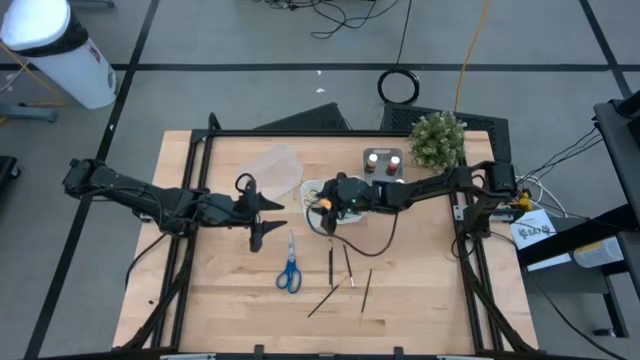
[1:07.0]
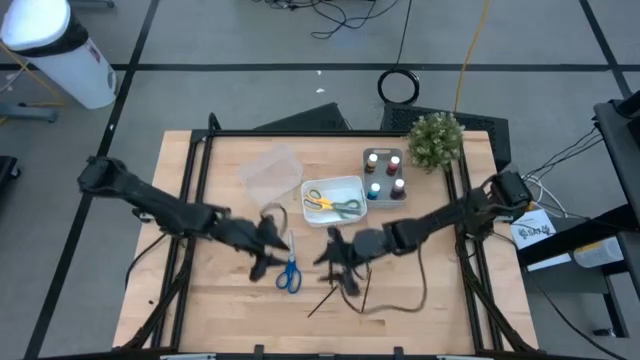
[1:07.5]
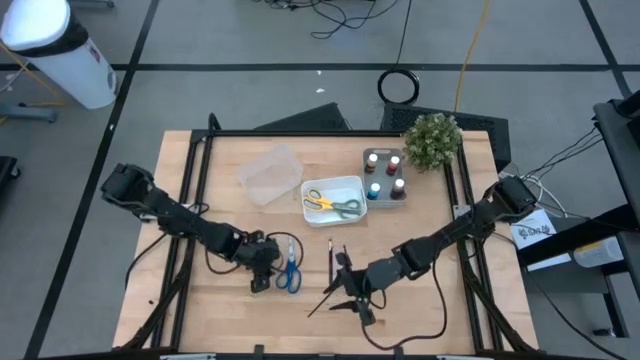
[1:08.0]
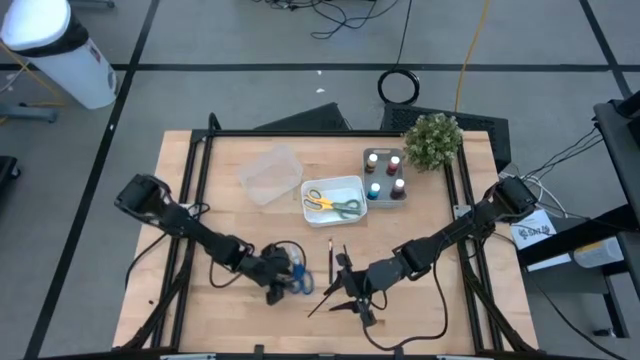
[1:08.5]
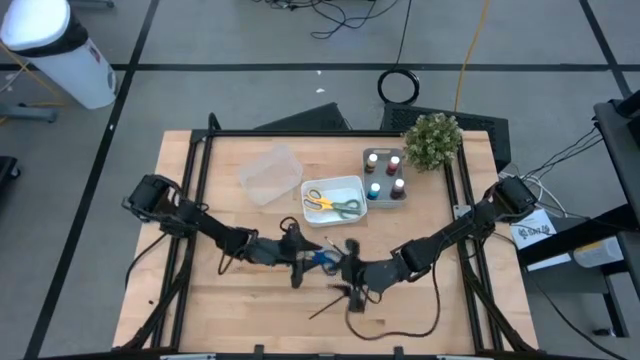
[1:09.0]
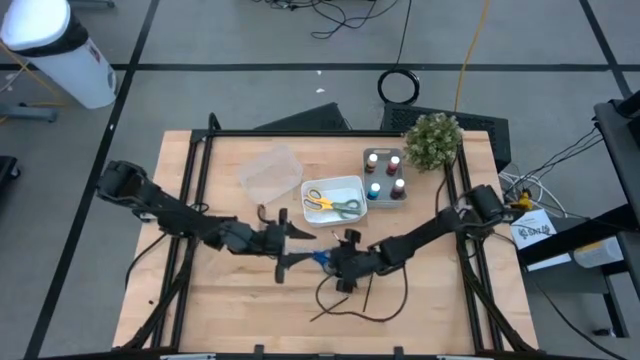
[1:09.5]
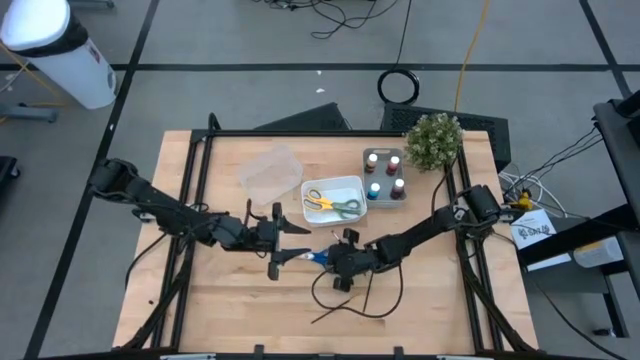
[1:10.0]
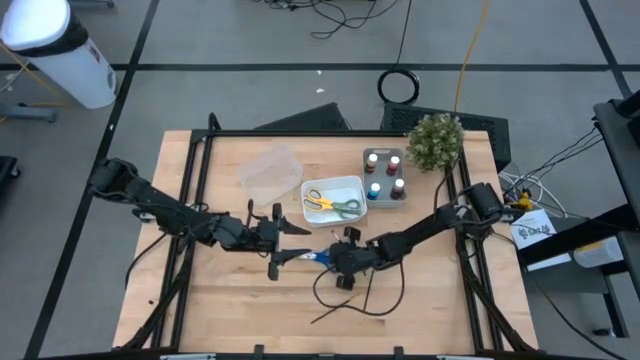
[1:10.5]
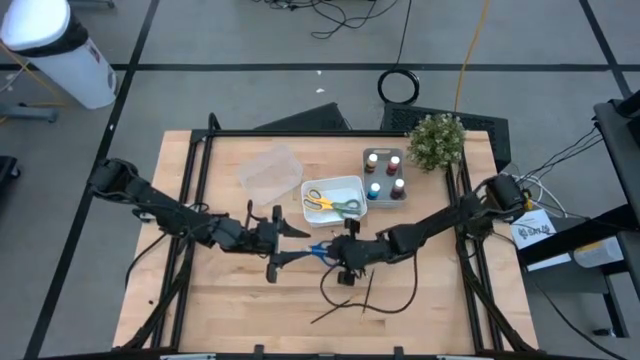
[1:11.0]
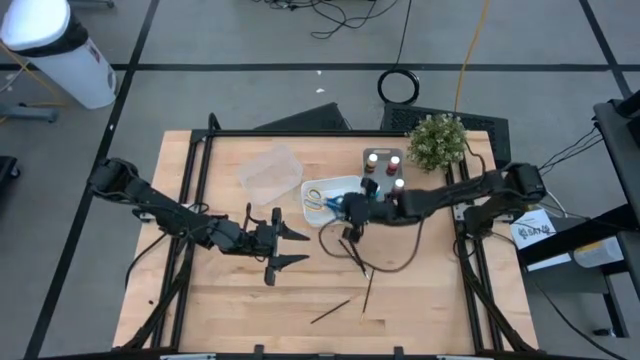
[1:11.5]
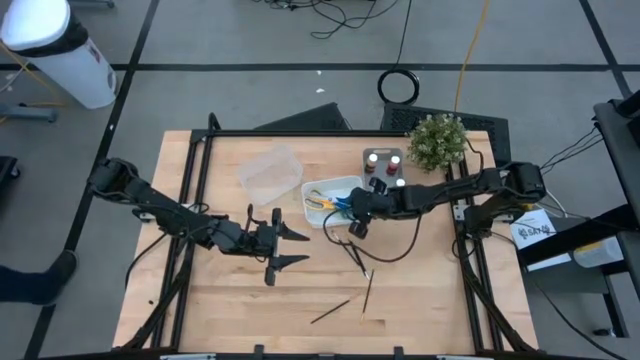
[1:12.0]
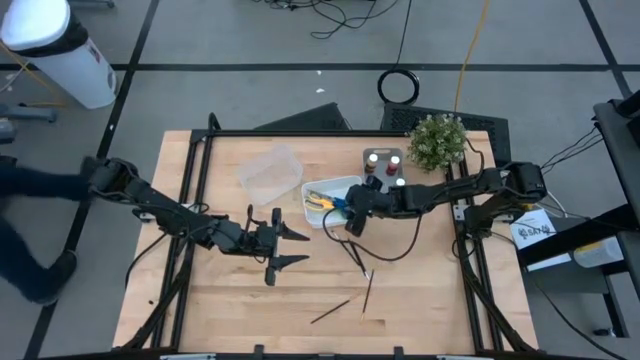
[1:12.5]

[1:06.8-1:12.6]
Task: Pick & Place Paint Supplies
Put the blue scissors in the white bin

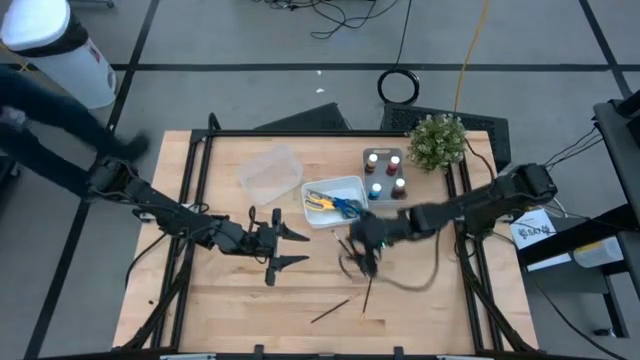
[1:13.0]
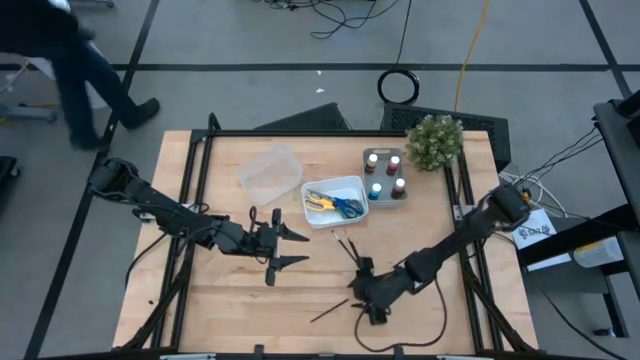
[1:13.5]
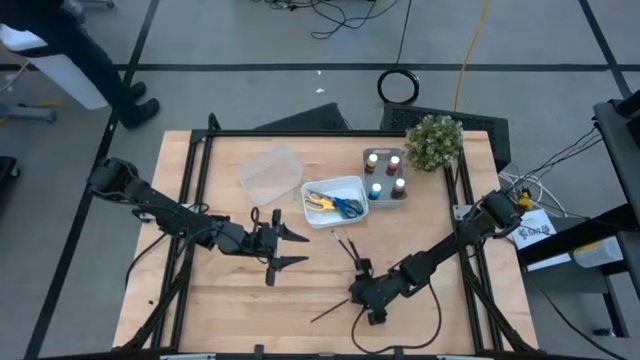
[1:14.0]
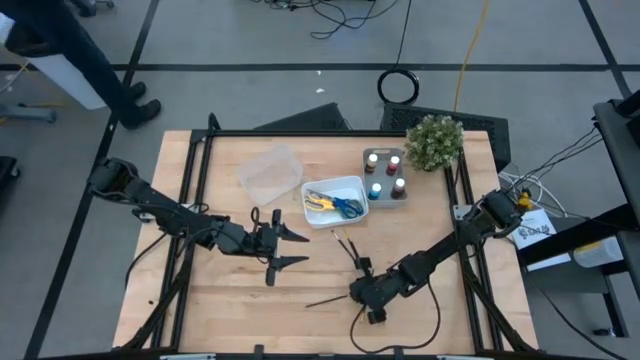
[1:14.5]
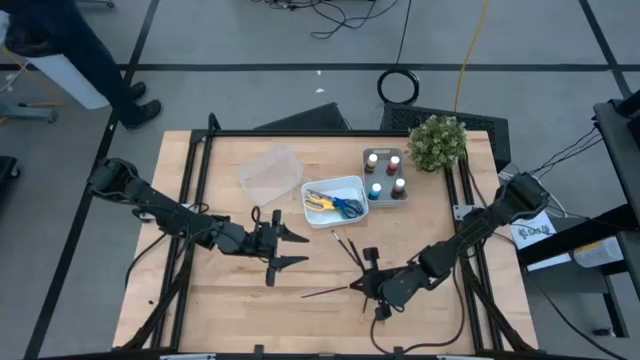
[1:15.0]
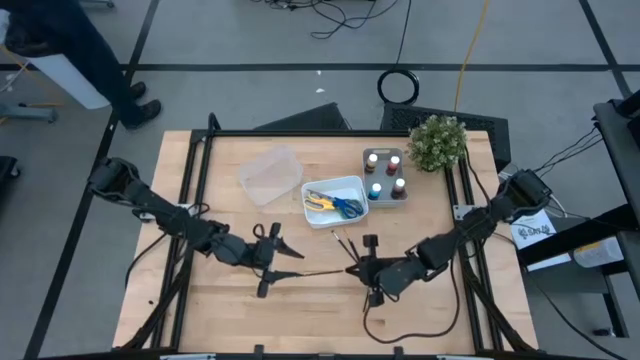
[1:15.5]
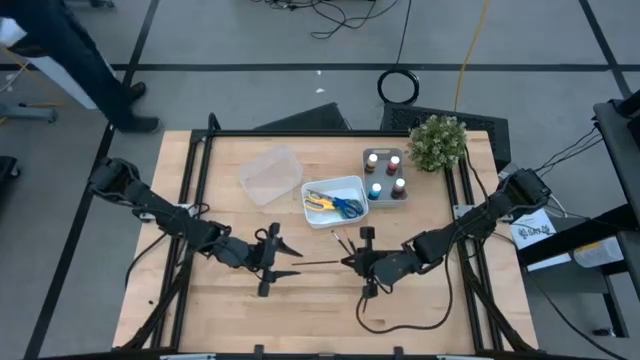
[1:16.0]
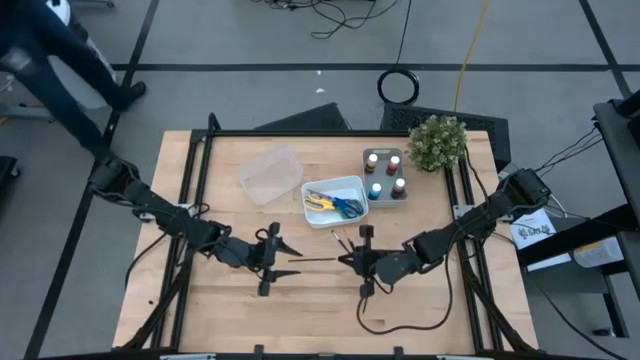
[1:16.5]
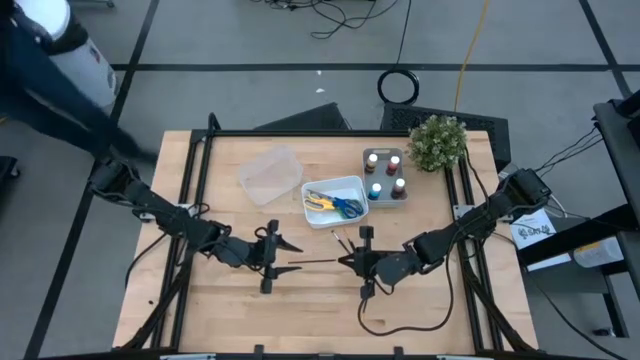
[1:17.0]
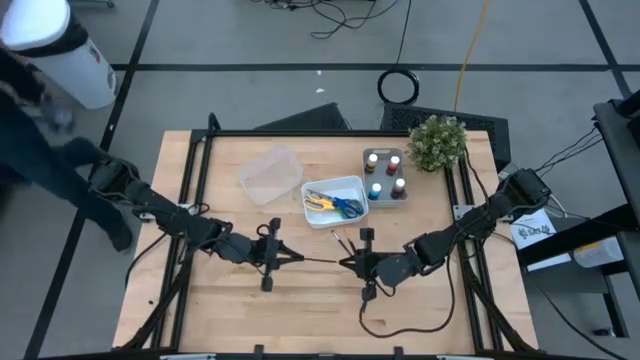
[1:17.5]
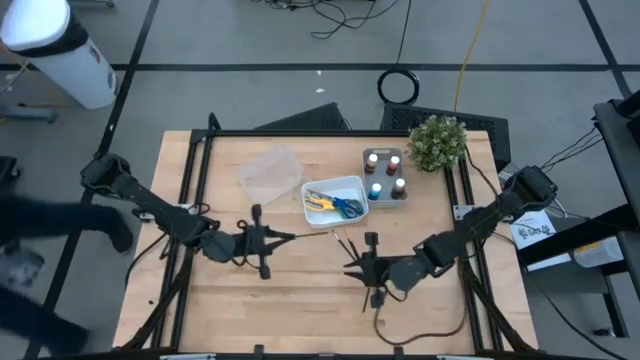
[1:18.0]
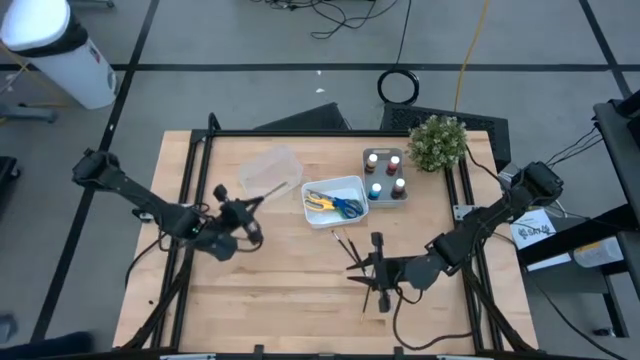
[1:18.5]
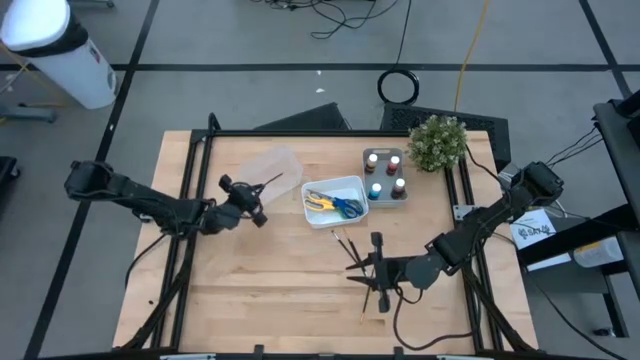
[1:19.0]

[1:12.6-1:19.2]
Put the bottom left gold paint brush in the transparent bin

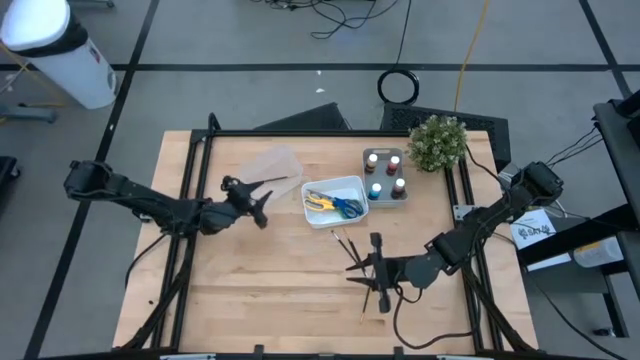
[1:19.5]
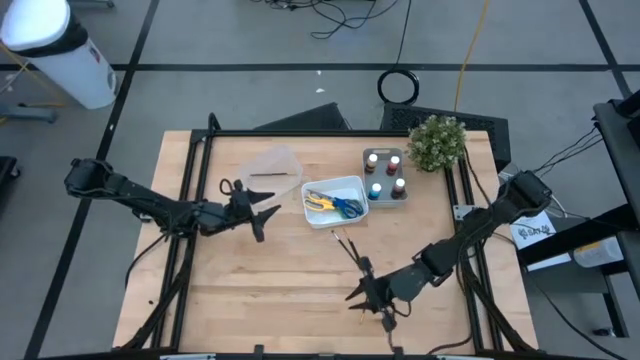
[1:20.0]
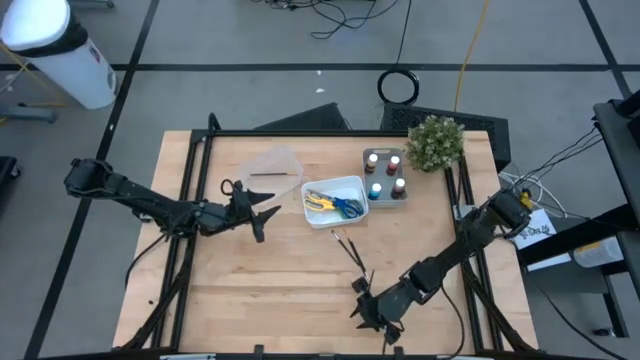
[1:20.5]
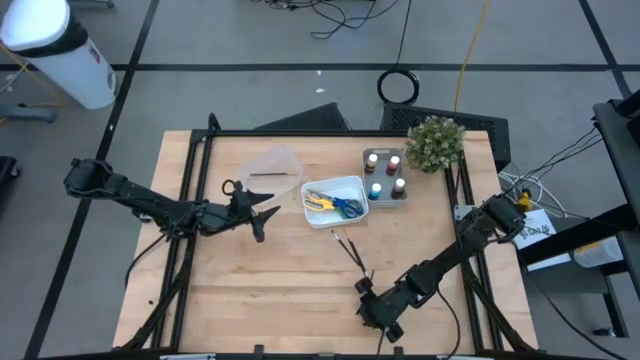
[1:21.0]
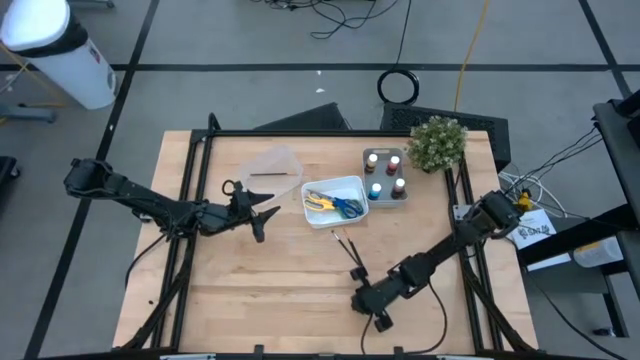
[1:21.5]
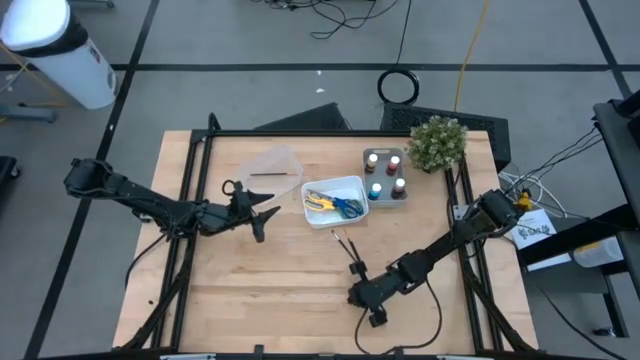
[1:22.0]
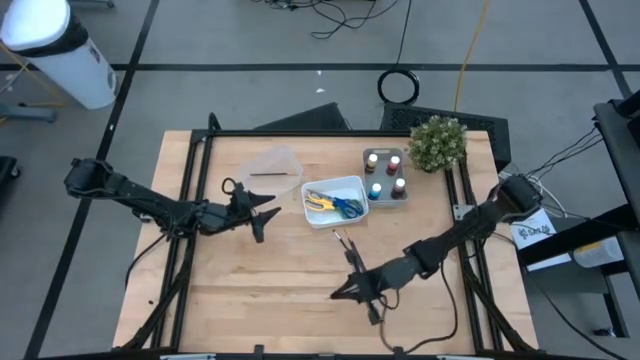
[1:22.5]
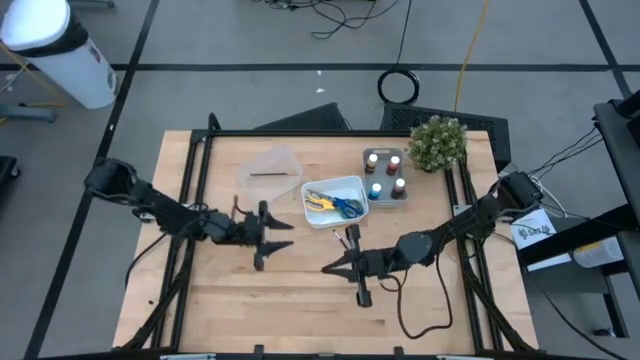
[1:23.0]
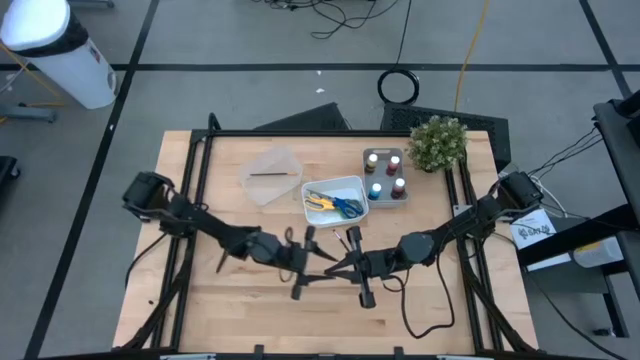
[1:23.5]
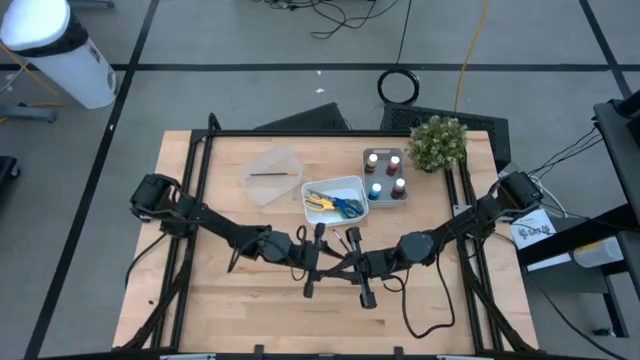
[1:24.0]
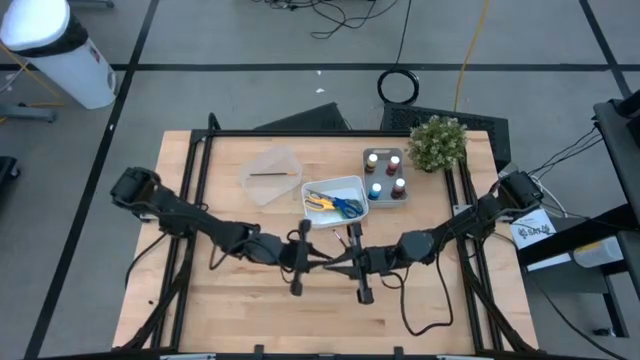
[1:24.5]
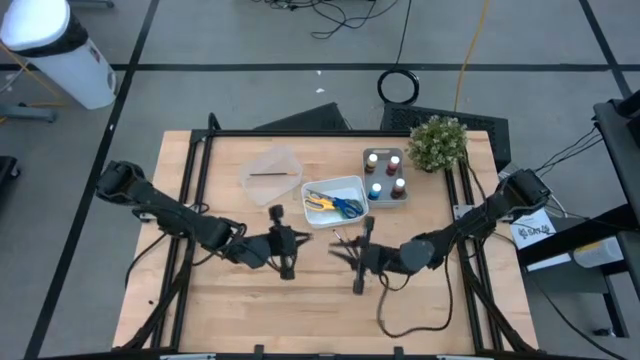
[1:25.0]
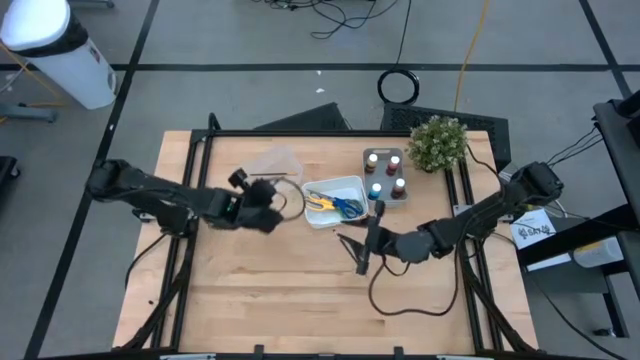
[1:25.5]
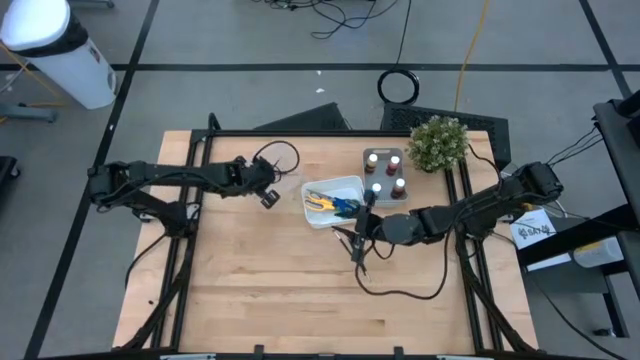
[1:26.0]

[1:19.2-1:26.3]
Put the bottom gold paint brush in the transparent bin

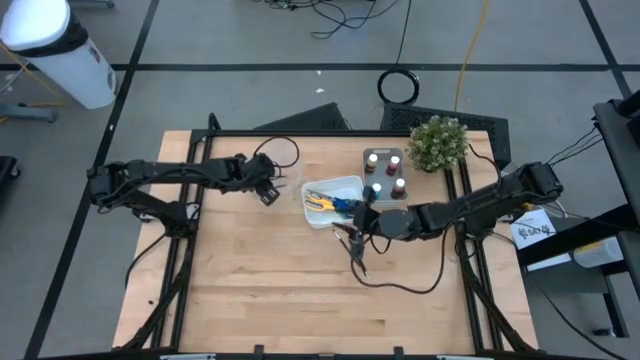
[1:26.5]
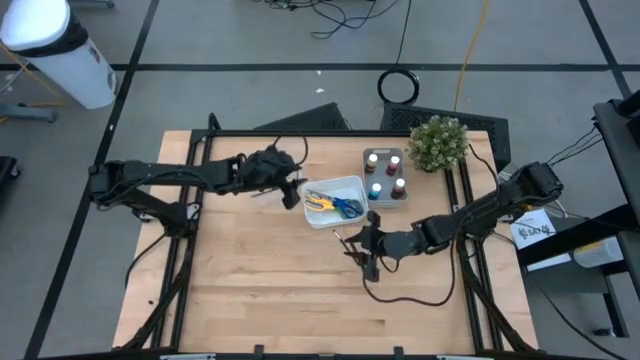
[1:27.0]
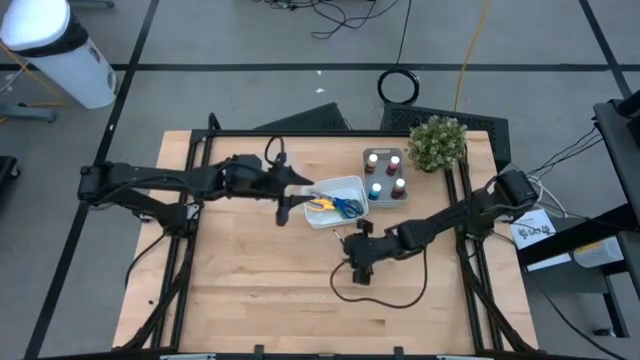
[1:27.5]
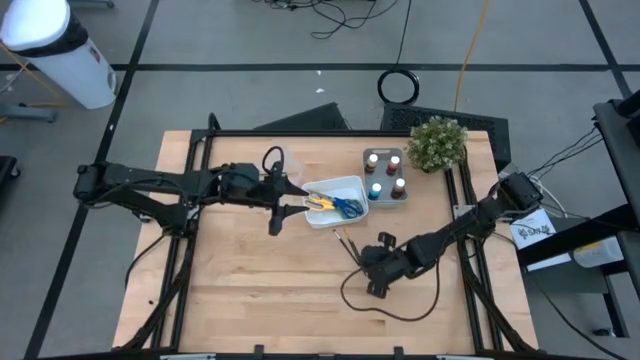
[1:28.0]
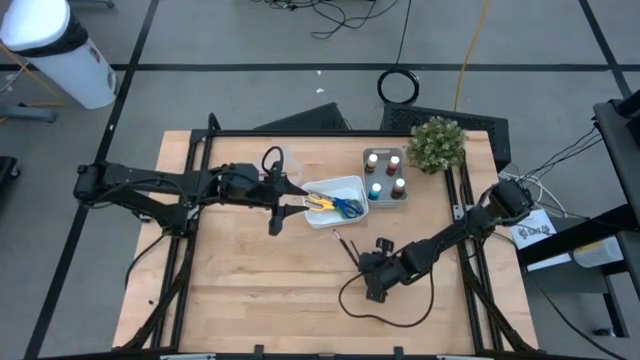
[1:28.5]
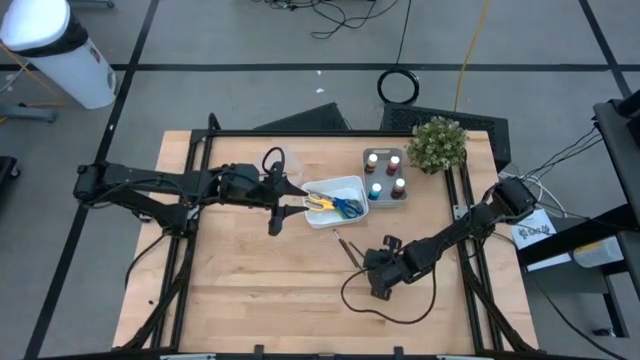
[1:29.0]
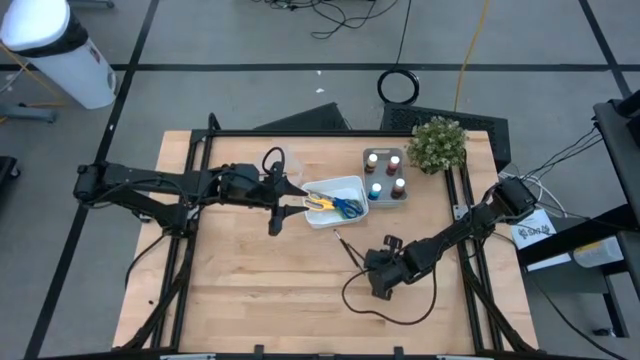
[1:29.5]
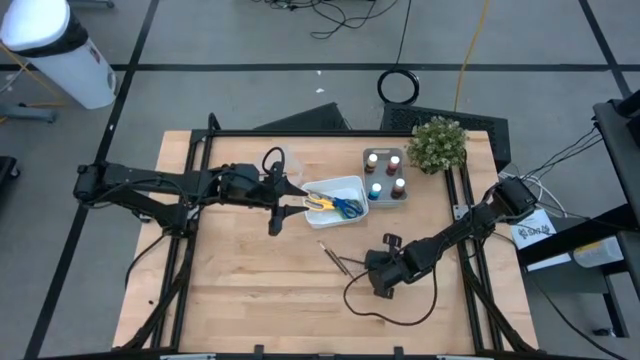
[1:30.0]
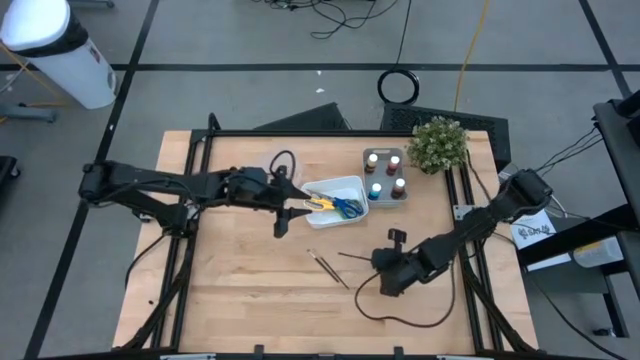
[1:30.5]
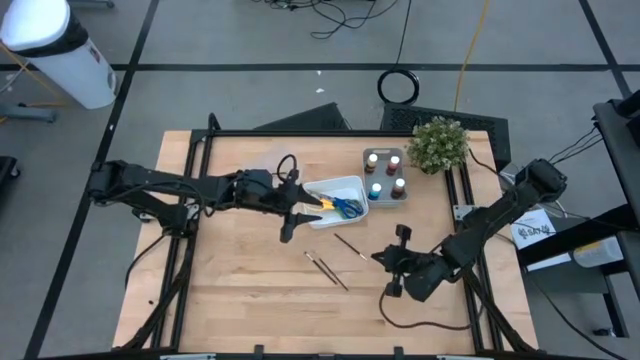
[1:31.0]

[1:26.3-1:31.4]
Put the right silver paint brush in the transparent bin
